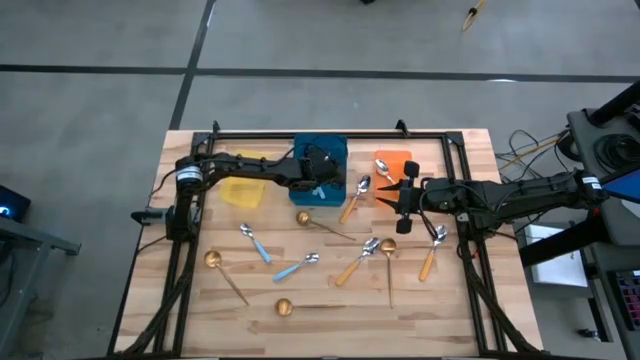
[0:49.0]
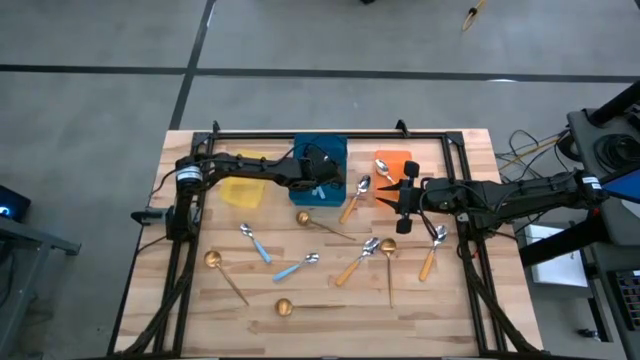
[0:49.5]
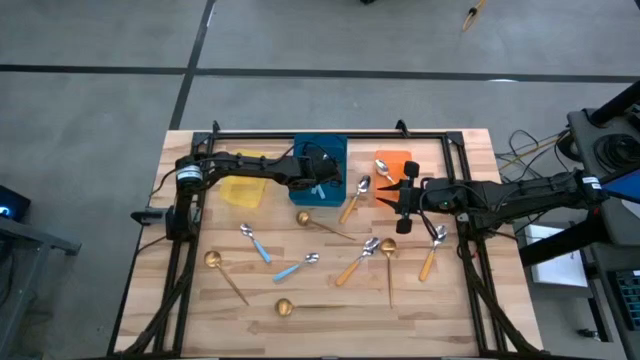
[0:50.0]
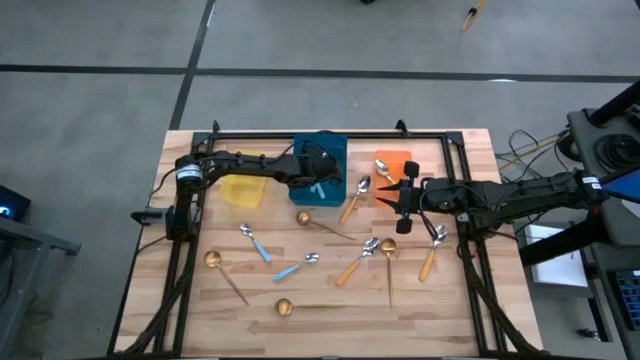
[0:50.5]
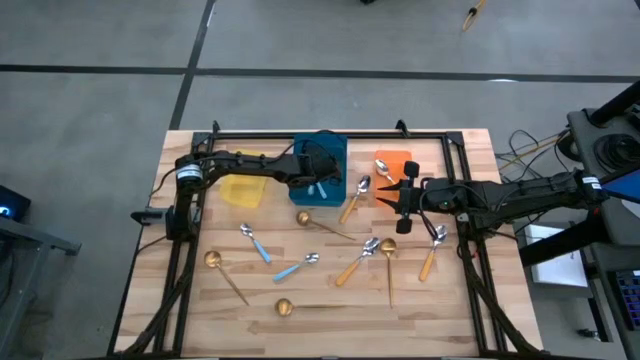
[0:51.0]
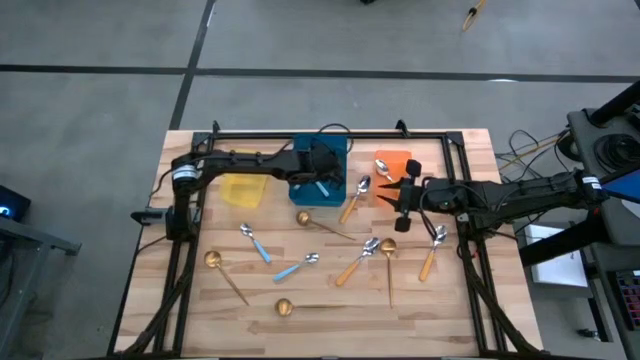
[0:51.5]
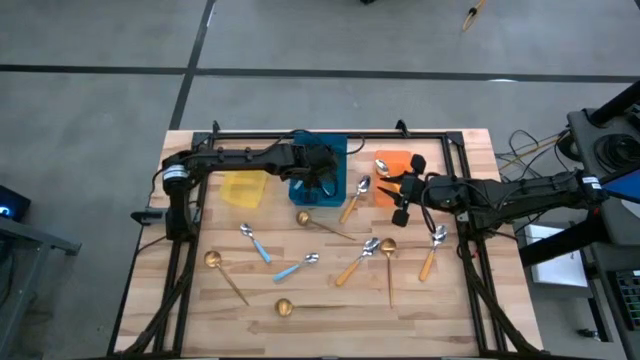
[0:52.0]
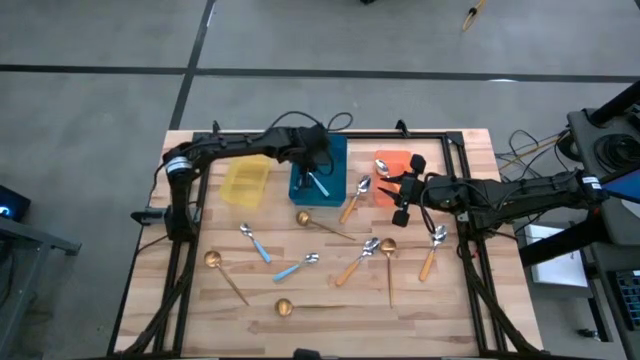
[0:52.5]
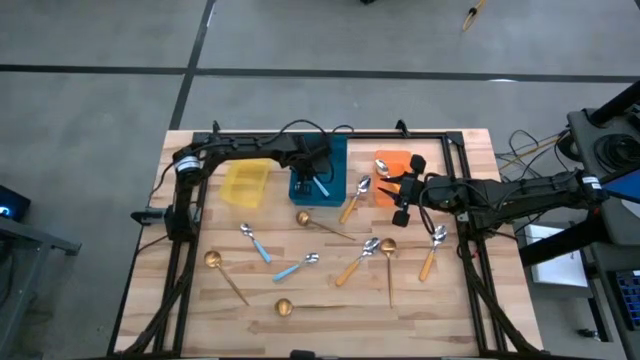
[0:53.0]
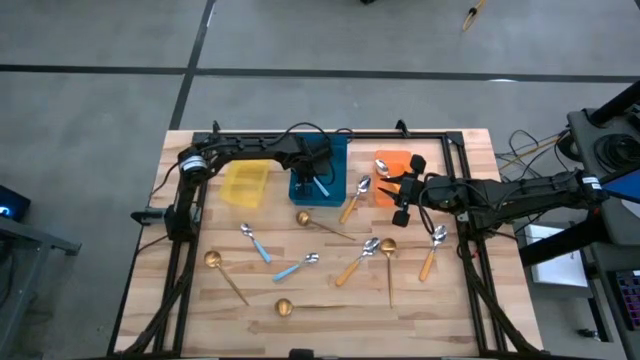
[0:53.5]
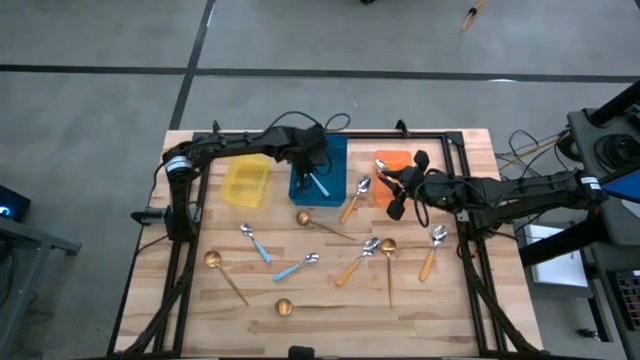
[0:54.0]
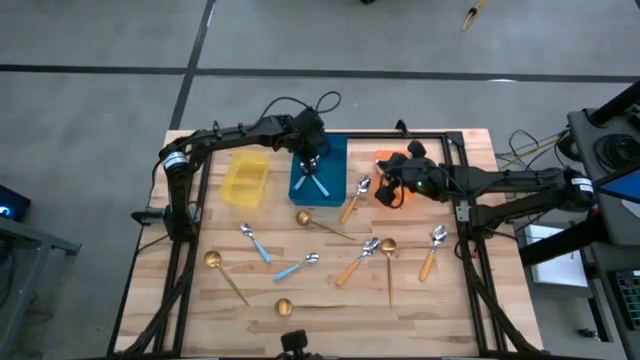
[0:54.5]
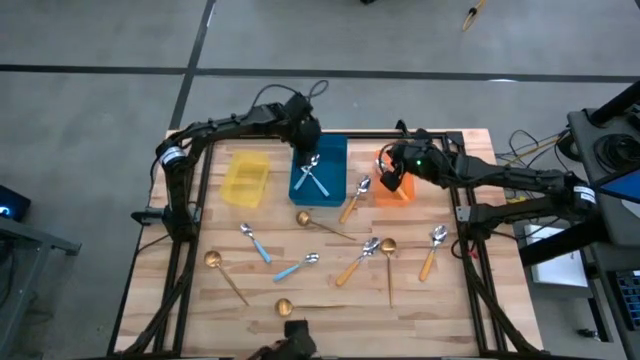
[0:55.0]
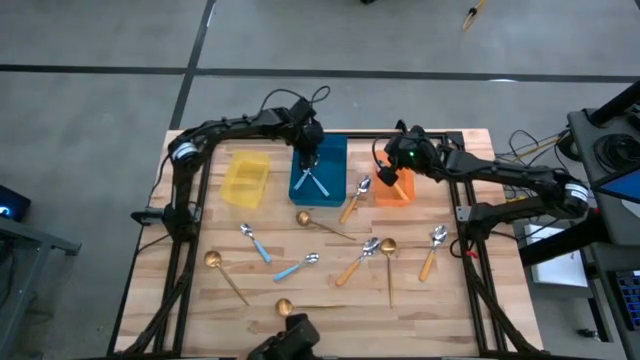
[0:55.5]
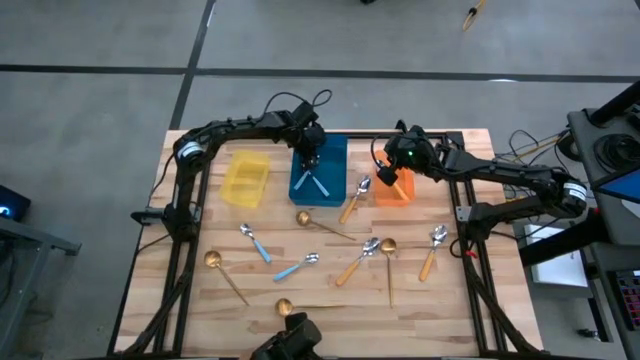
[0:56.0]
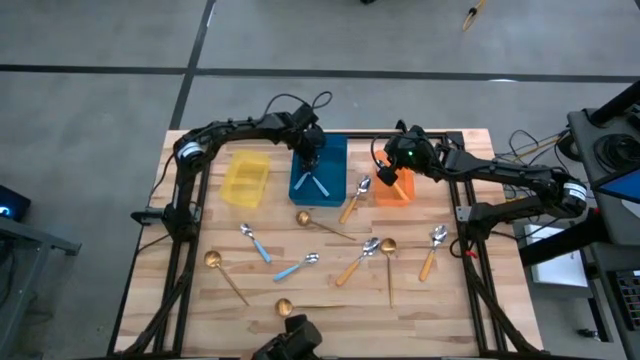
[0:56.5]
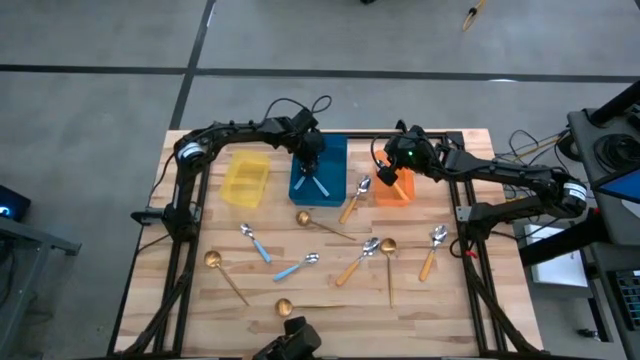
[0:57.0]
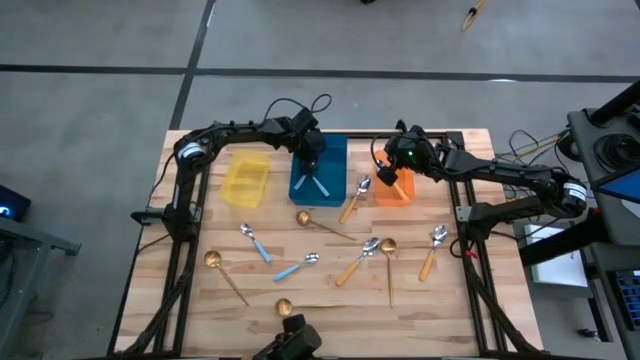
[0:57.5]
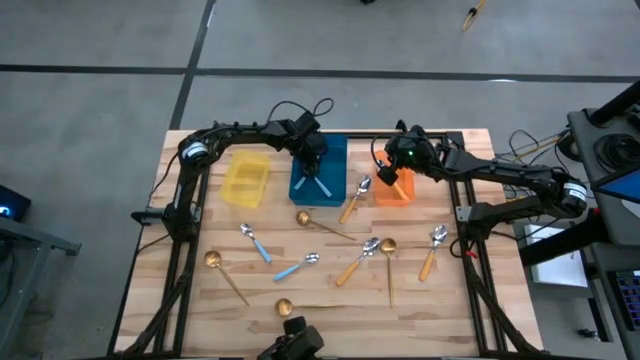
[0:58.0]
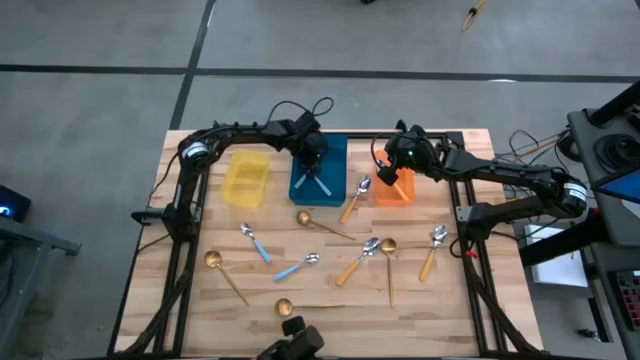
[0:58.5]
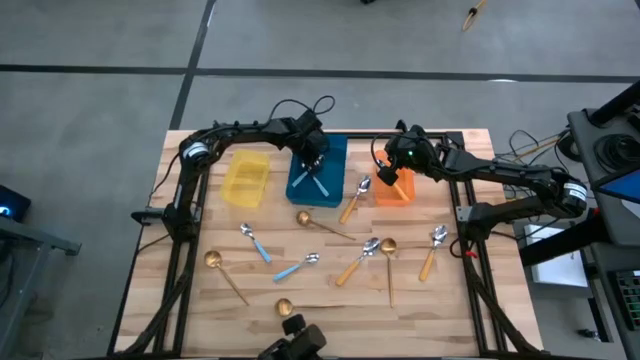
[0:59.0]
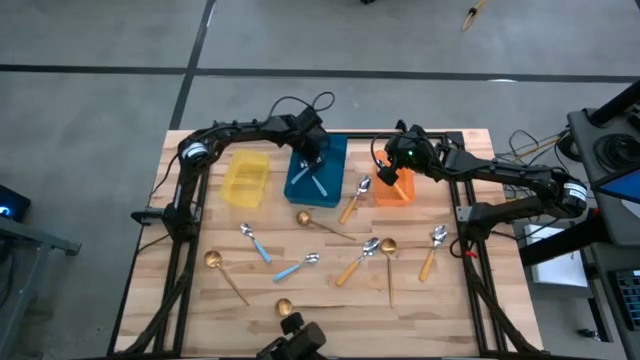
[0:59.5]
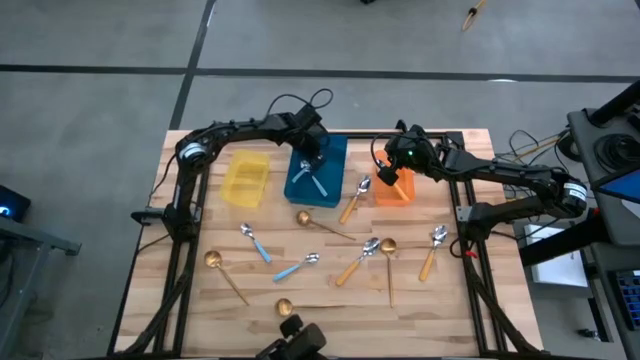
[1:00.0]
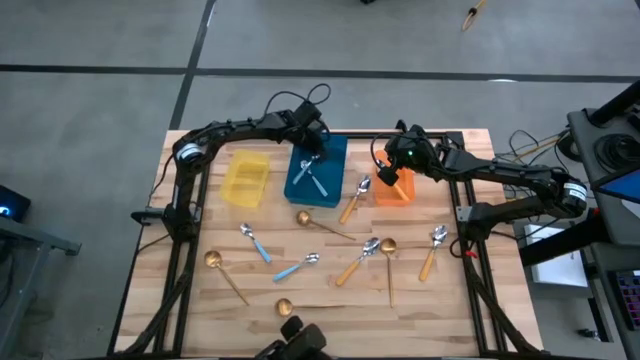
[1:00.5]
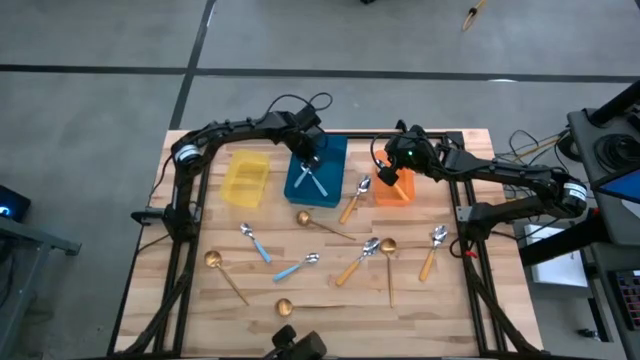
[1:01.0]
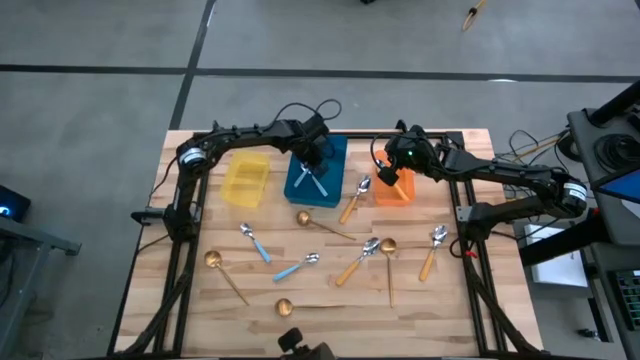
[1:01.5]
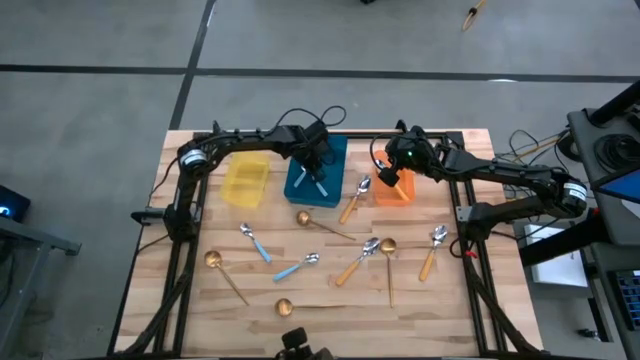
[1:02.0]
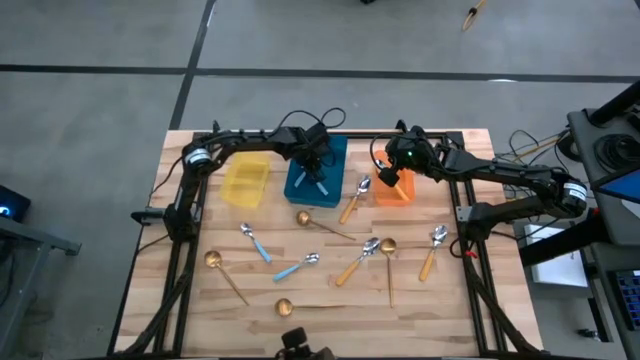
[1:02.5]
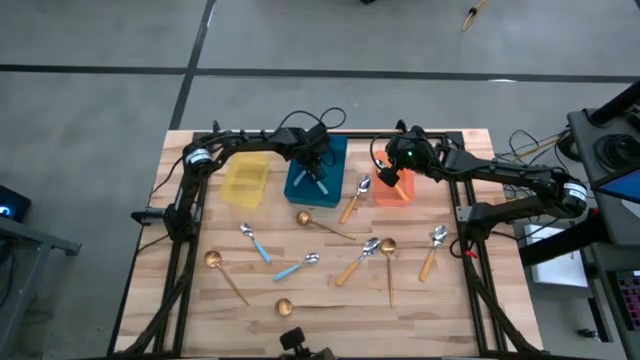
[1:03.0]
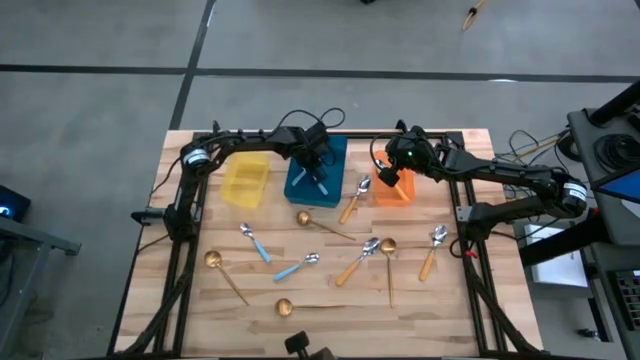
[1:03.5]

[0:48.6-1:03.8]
Task: Sort silverware by color (type)
Put the blue spoon into the blue bin

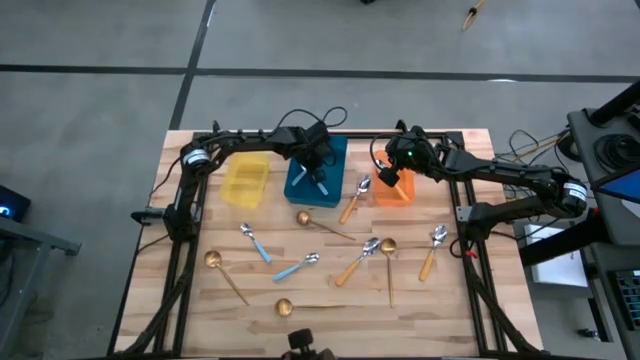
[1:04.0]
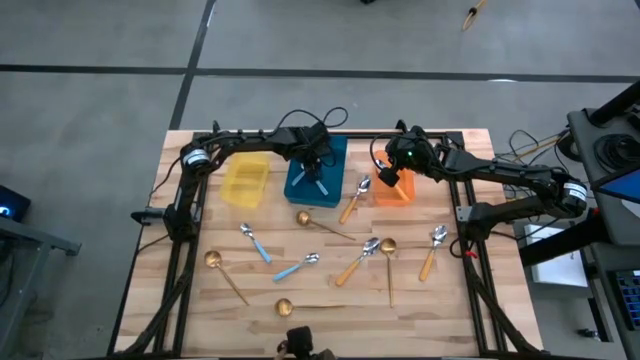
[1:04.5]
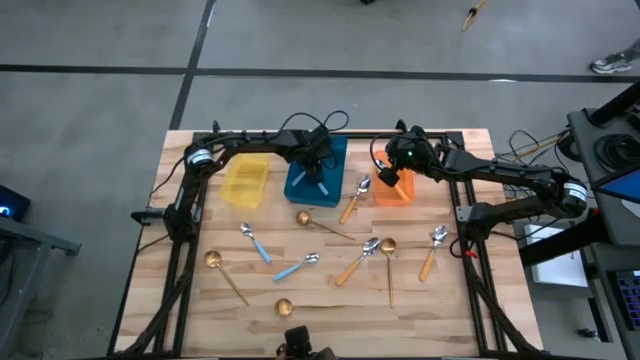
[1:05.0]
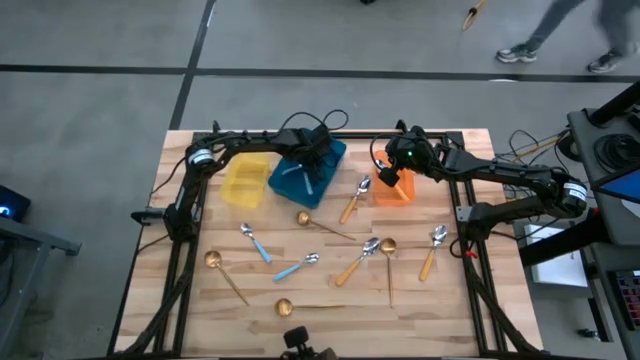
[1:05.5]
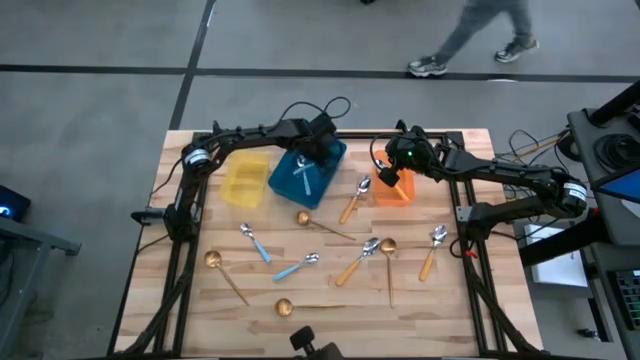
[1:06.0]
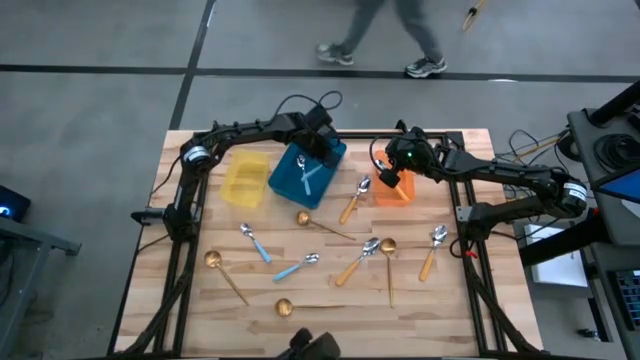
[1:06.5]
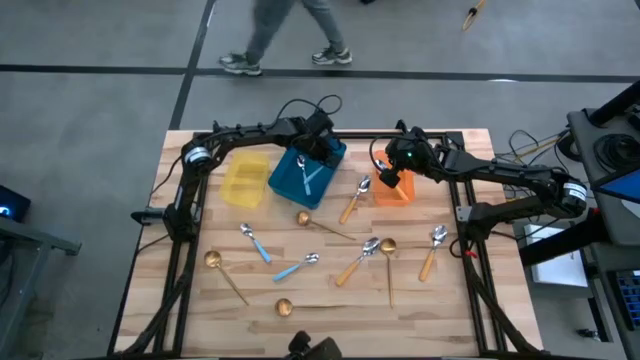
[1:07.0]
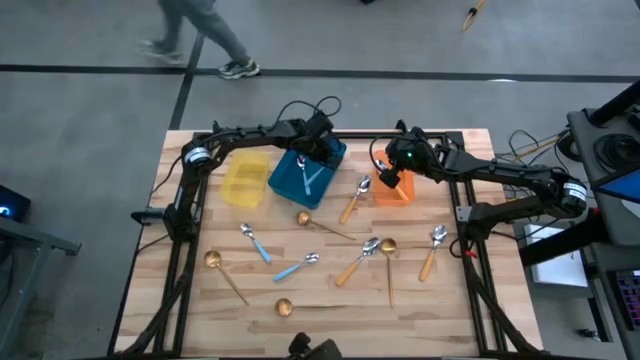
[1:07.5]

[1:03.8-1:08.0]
Put the blue spoon into the blue bin

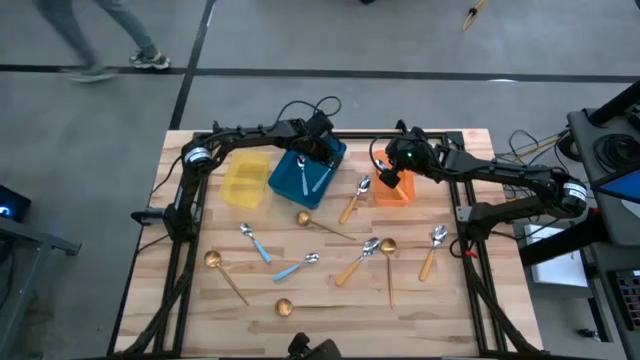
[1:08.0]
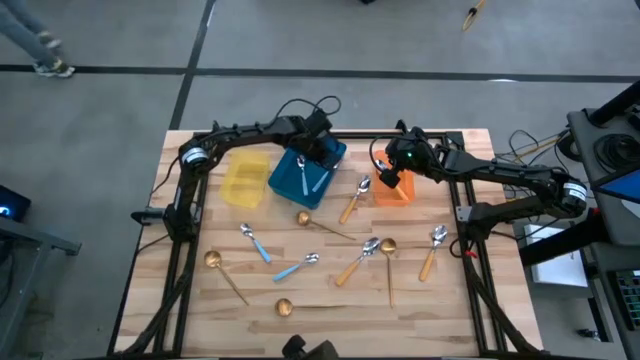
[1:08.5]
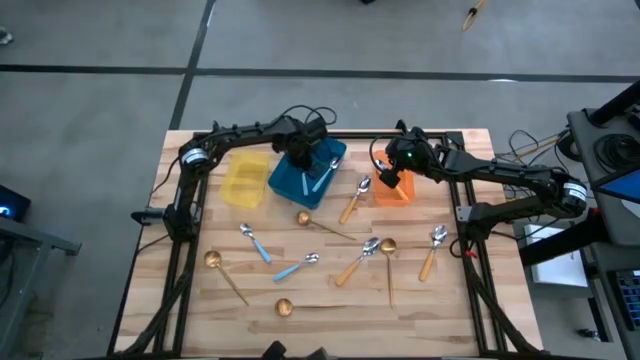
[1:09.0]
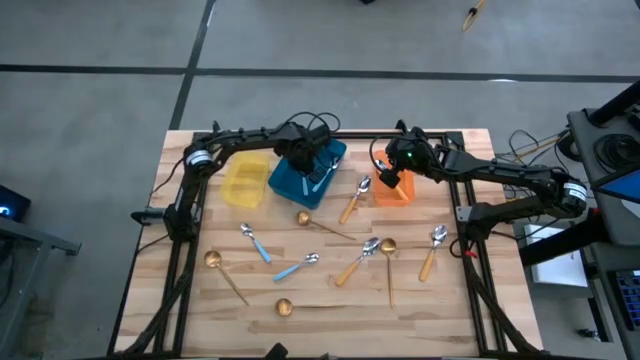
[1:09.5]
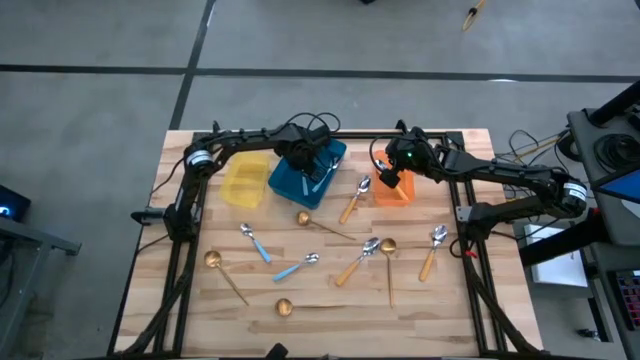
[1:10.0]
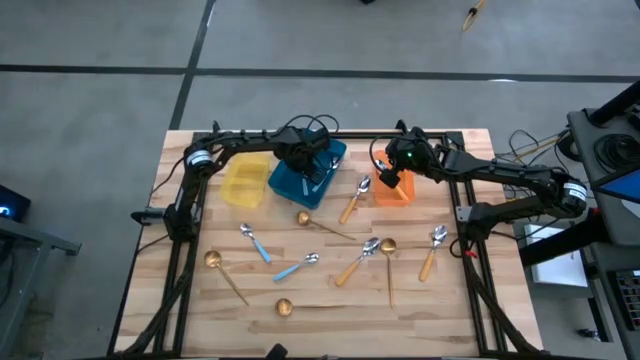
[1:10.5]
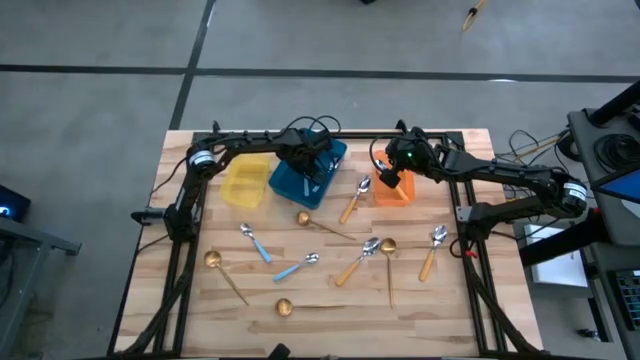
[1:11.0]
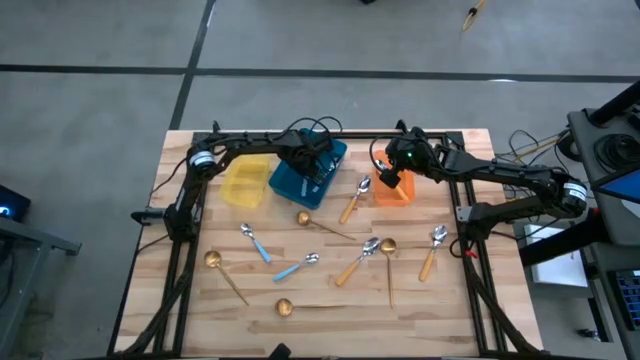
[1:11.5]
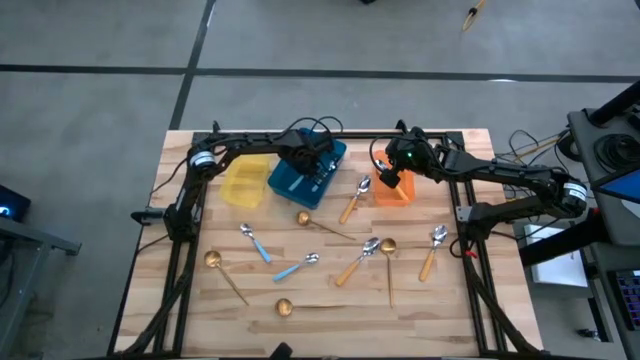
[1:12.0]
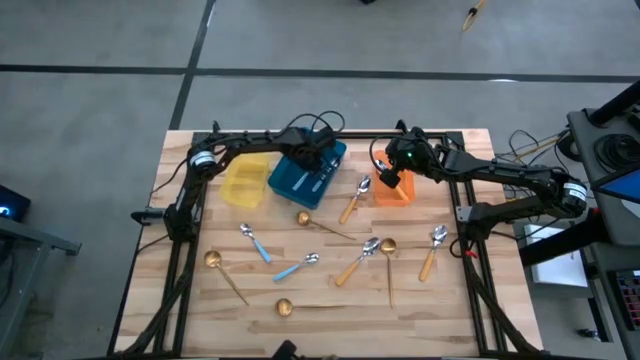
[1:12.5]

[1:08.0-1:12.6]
Adjust the blue spoon in the blue bin
